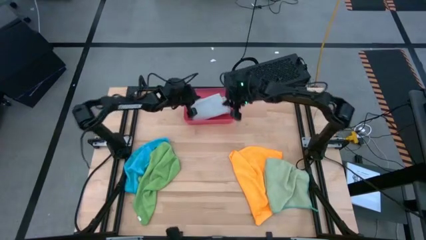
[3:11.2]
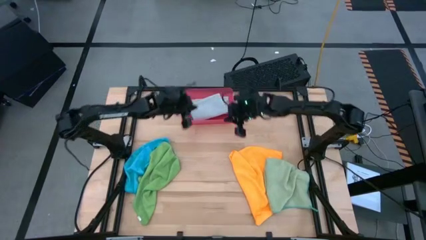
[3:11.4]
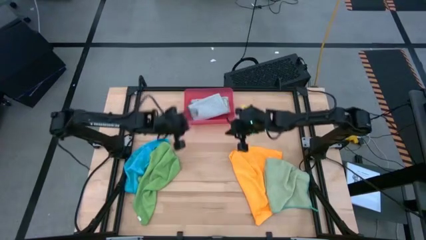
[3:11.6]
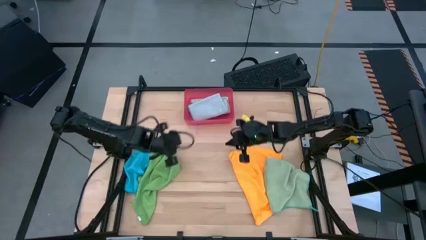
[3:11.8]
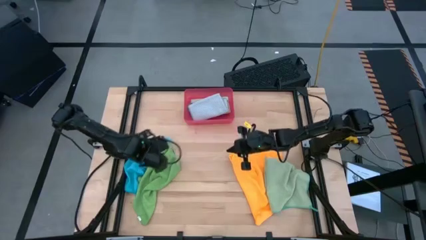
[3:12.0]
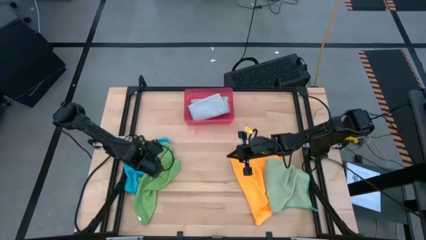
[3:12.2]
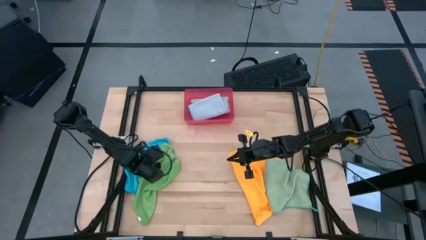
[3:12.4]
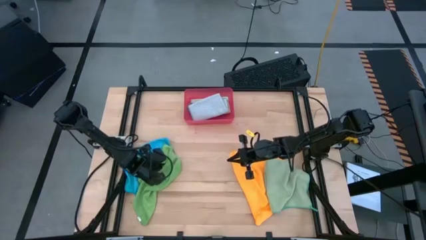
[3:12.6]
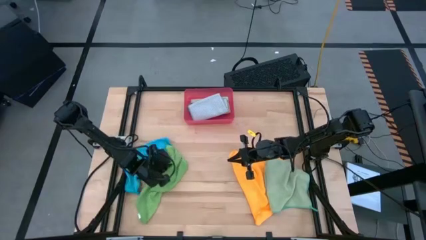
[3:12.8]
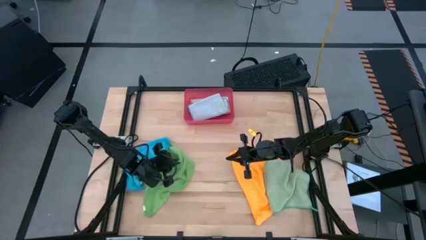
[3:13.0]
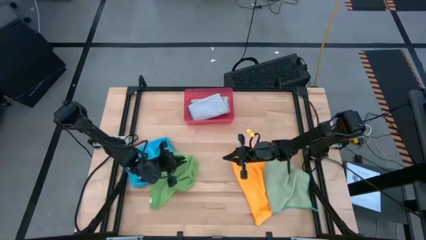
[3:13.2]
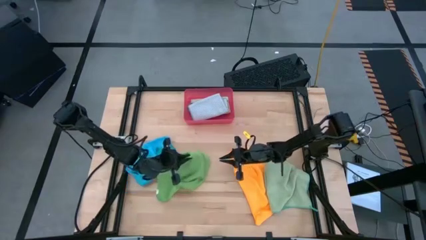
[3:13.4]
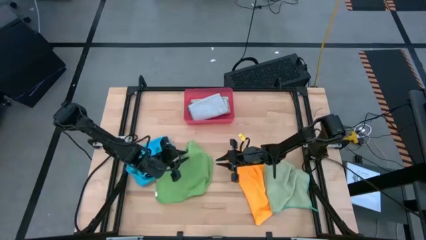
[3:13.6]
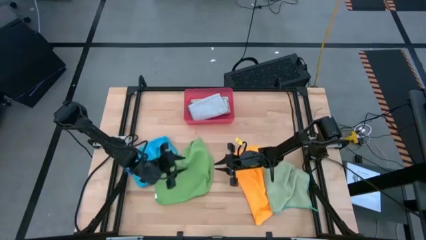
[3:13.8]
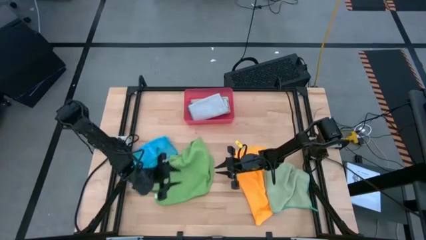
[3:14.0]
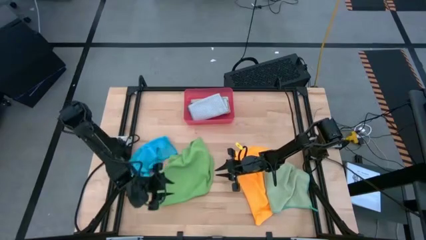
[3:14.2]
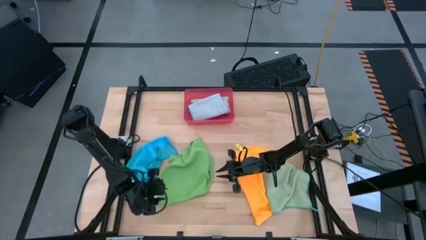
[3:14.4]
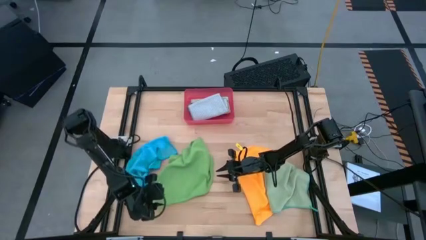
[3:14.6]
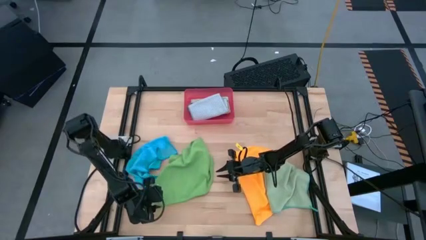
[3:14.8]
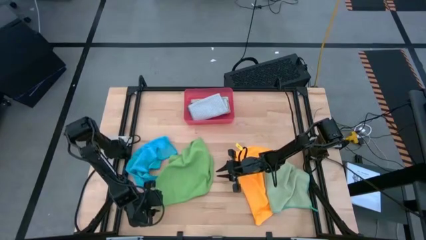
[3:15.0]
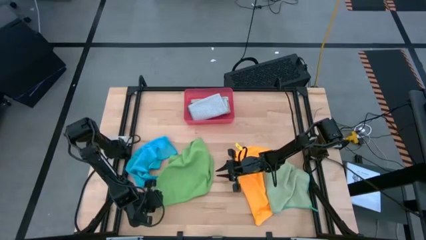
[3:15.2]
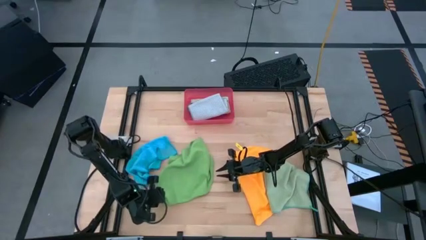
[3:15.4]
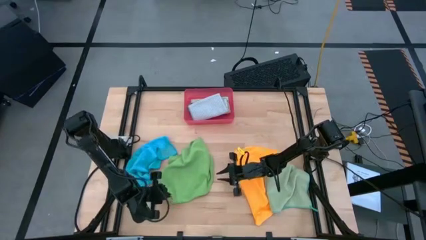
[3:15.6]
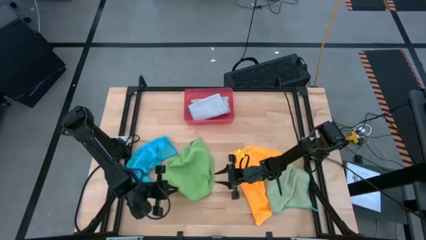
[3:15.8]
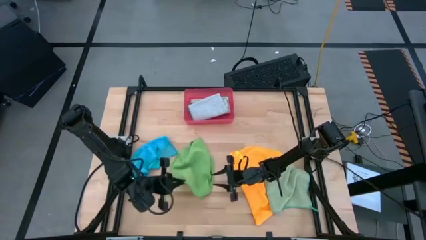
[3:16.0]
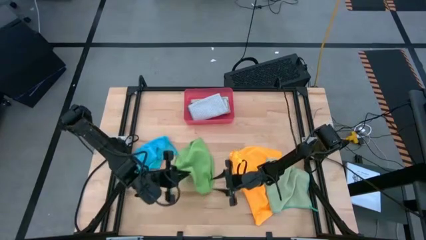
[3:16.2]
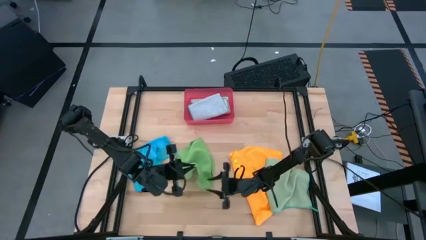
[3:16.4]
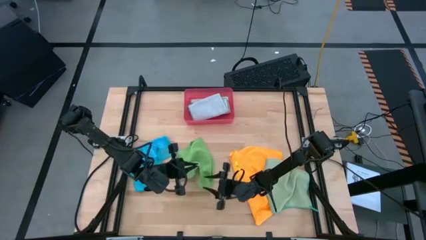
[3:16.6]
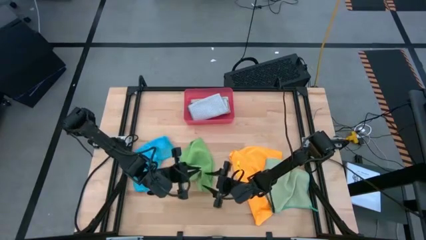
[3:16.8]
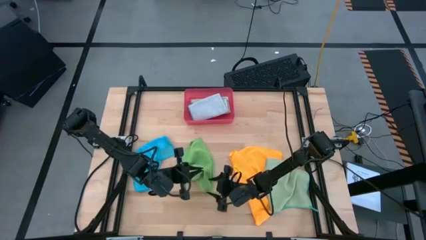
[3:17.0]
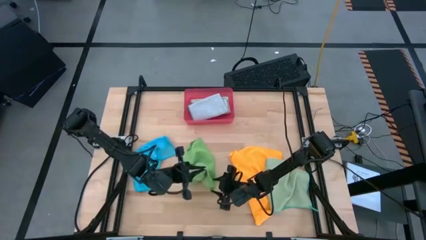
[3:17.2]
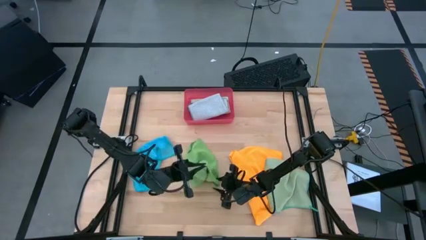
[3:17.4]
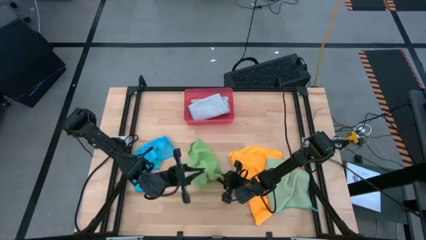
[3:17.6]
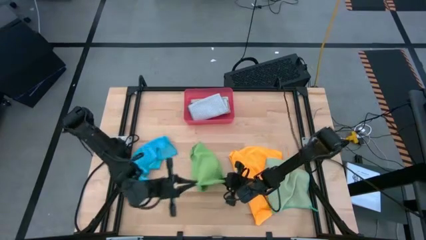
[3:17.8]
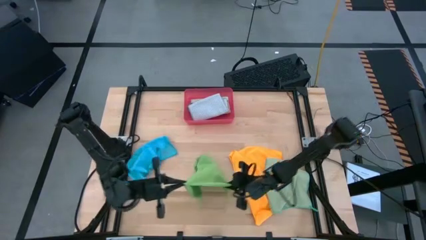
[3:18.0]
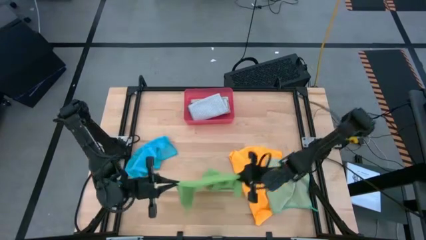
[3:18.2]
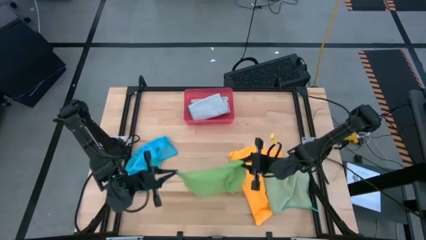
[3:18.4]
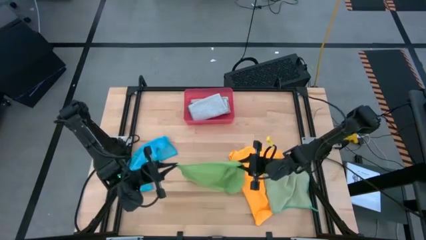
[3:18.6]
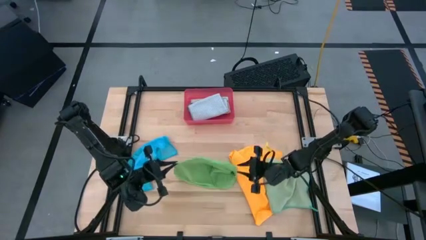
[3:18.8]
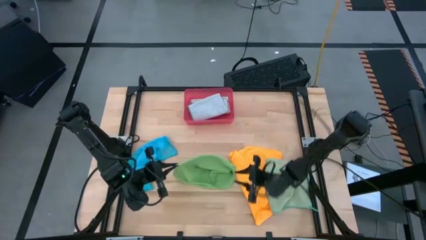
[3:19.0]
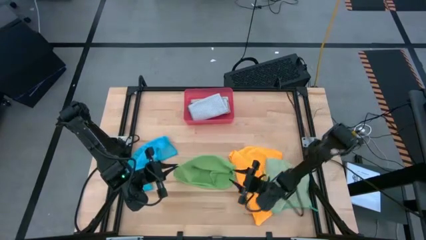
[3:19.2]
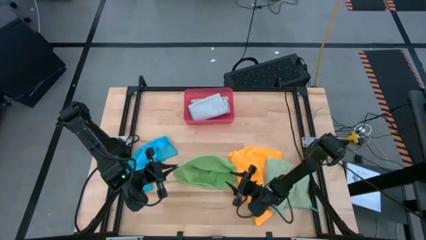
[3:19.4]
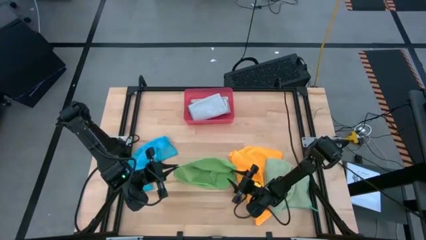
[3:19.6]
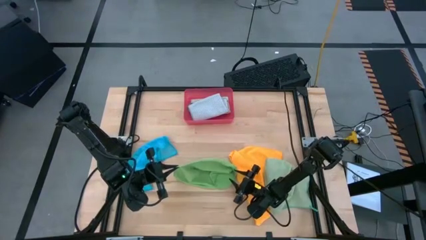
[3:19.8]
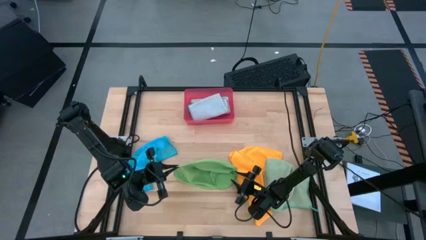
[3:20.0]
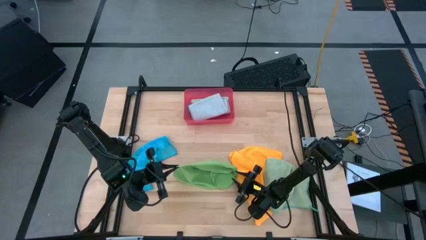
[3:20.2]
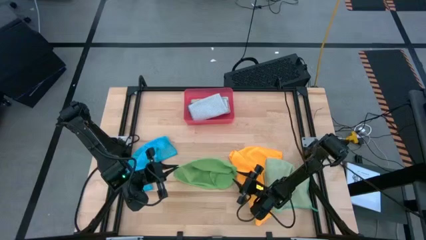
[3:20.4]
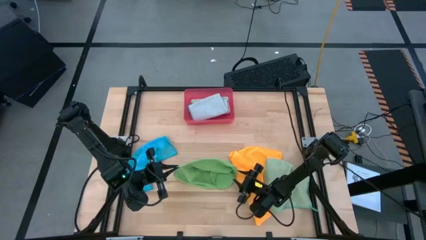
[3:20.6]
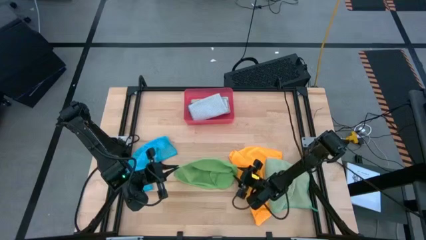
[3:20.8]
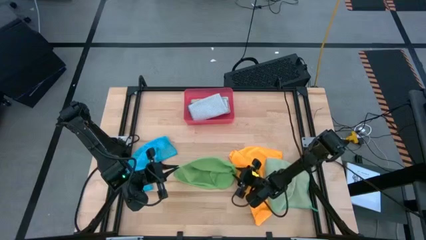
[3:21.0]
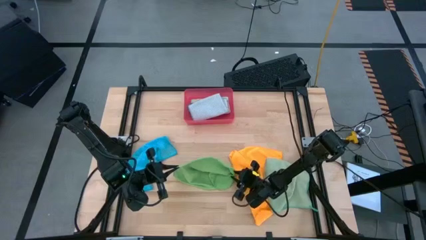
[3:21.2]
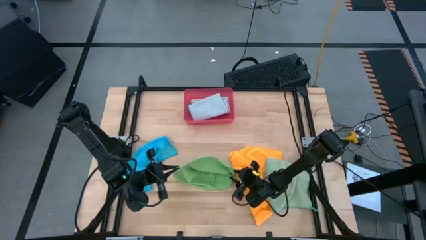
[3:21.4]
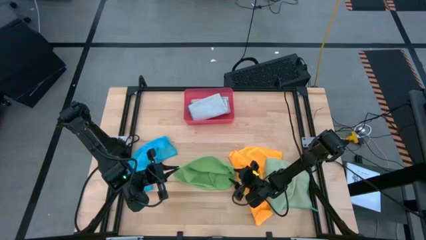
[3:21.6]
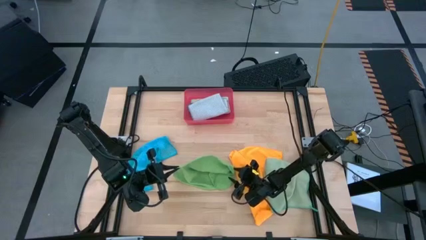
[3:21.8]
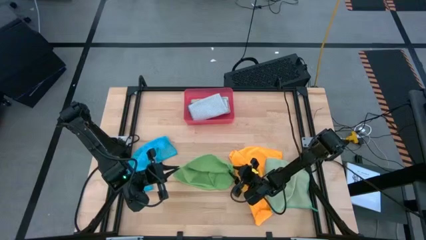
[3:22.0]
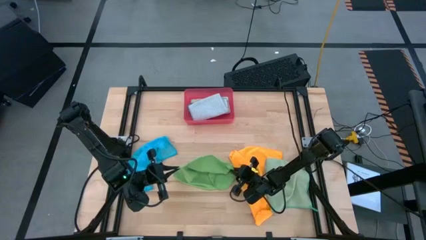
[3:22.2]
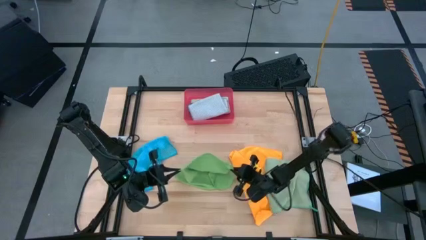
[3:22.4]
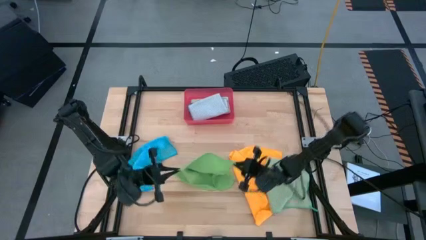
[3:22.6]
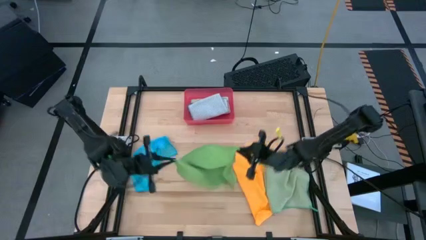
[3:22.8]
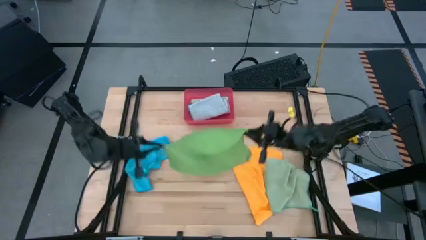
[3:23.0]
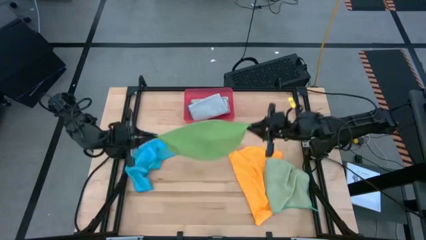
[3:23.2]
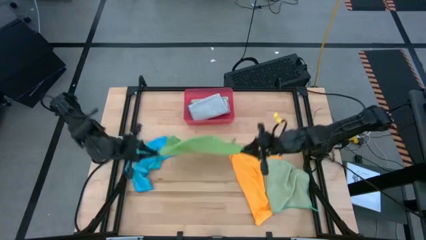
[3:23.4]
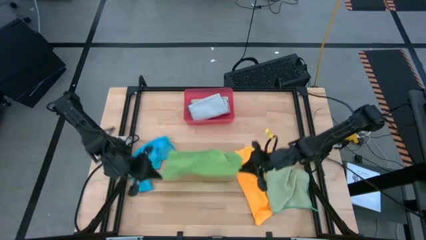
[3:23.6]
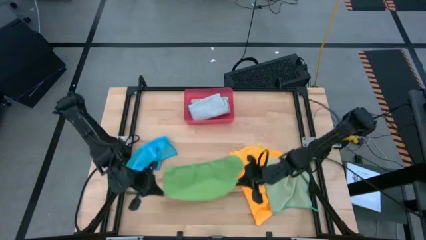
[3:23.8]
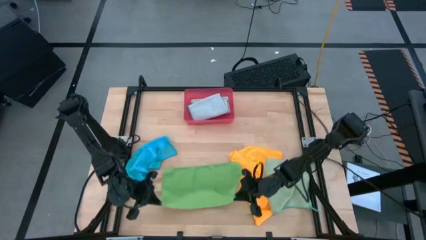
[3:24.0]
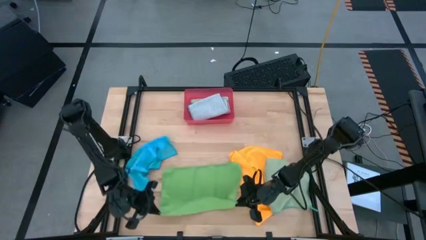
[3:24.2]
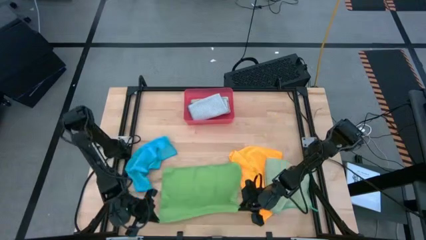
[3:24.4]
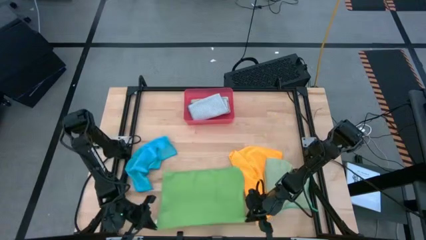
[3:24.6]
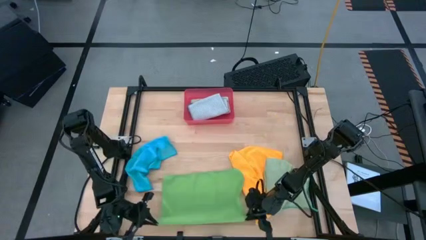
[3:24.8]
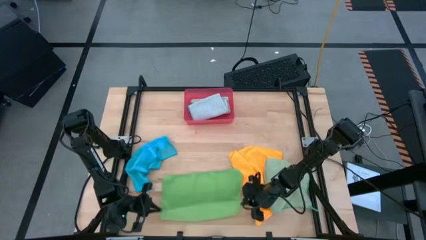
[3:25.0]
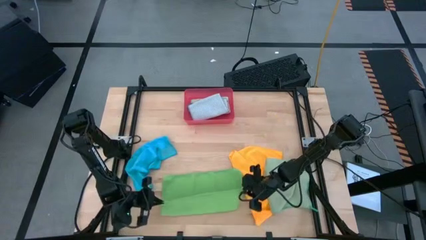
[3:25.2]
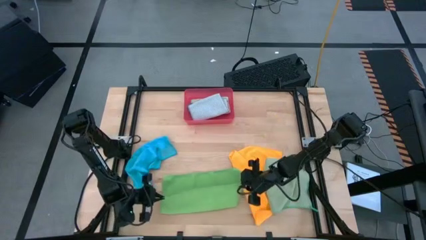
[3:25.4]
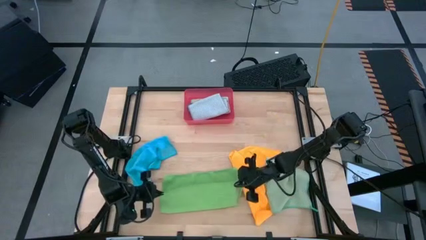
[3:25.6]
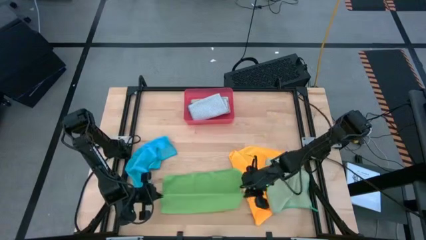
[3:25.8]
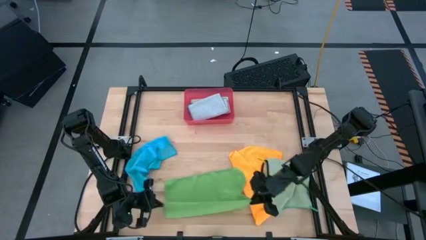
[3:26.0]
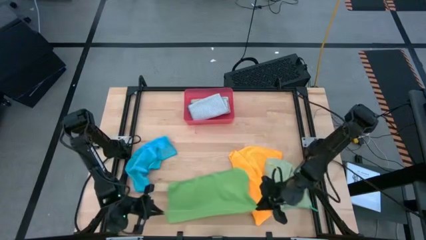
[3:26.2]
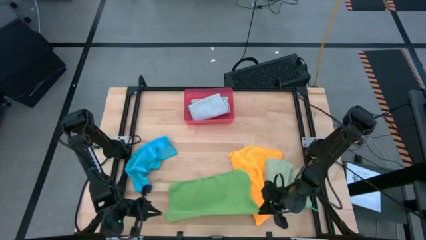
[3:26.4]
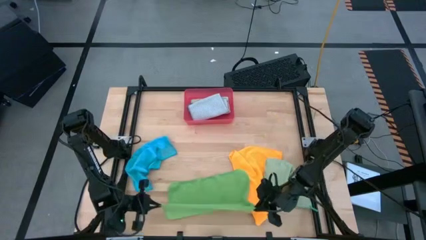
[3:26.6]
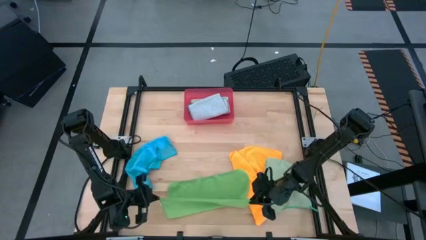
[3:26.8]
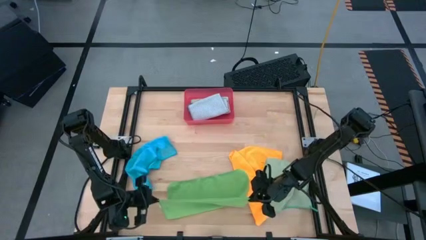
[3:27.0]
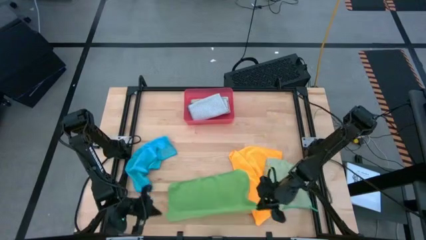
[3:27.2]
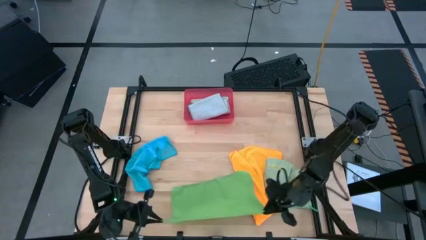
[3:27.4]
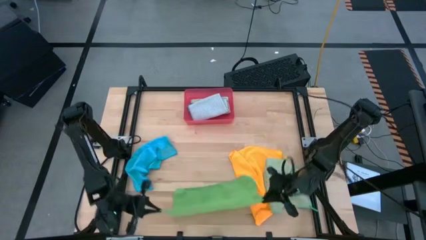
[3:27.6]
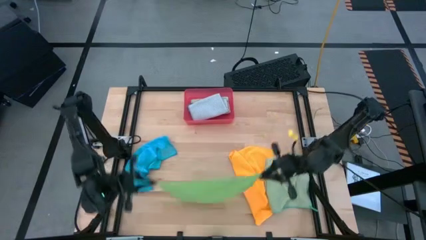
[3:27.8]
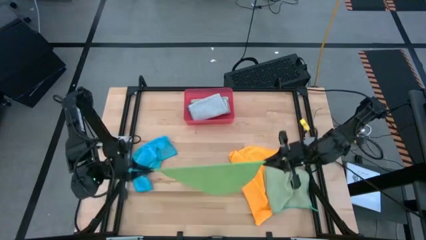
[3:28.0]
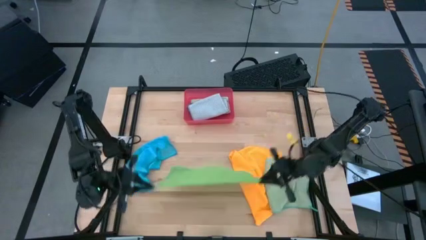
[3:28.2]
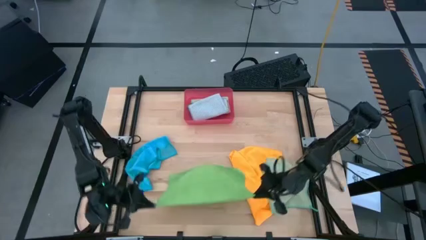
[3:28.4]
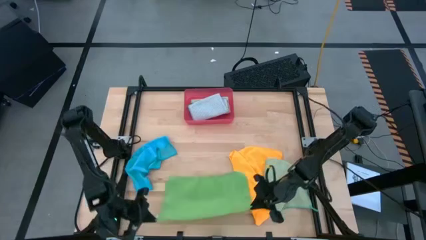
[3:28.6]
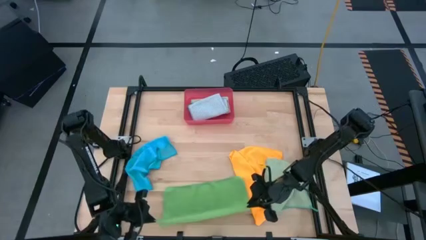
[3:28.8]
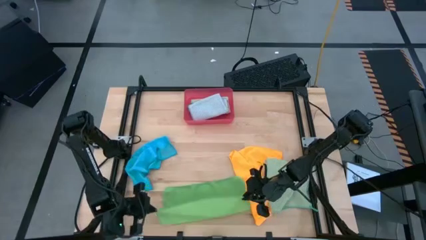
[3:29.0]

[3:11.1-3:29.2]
Task: Fold microfiber towels
Fold the green towel
